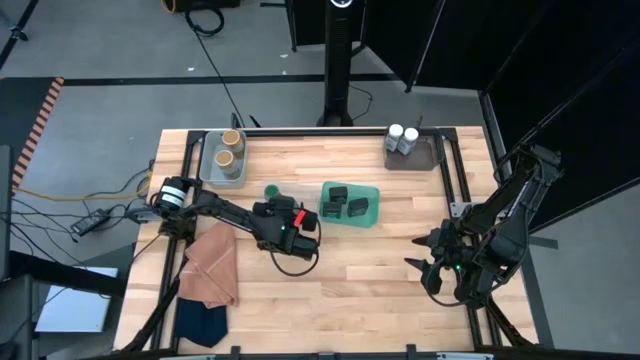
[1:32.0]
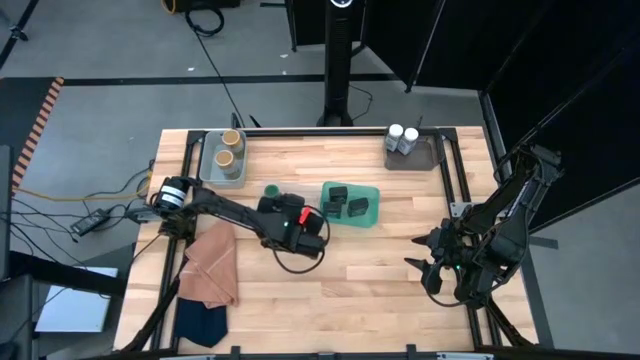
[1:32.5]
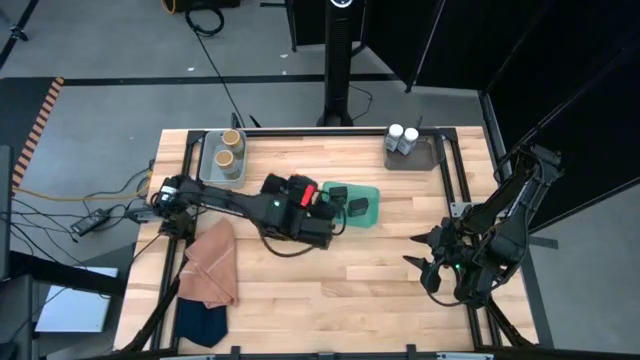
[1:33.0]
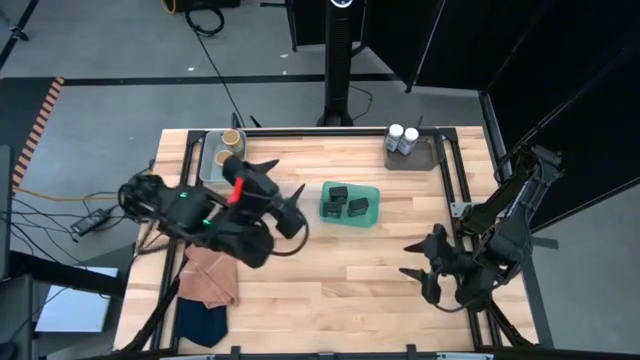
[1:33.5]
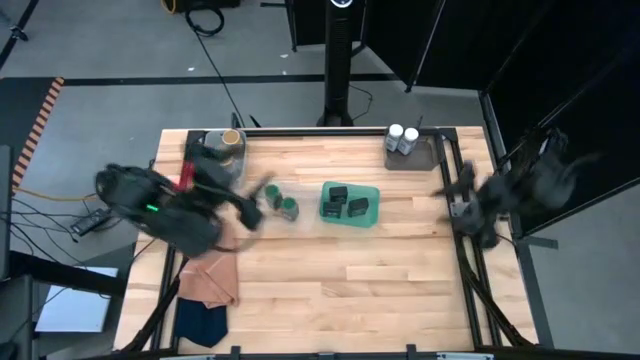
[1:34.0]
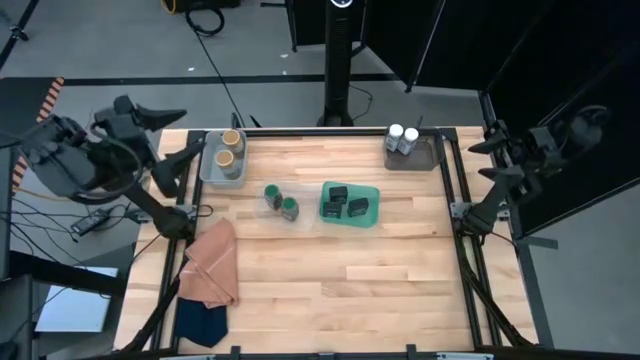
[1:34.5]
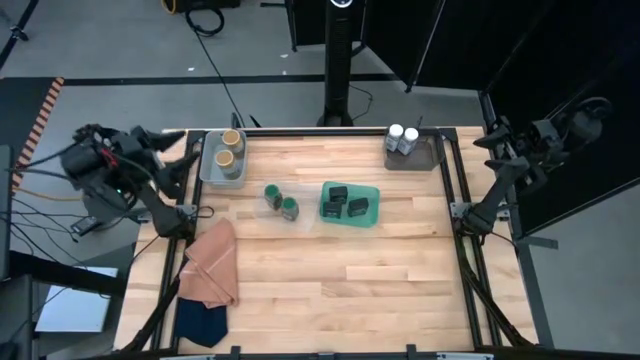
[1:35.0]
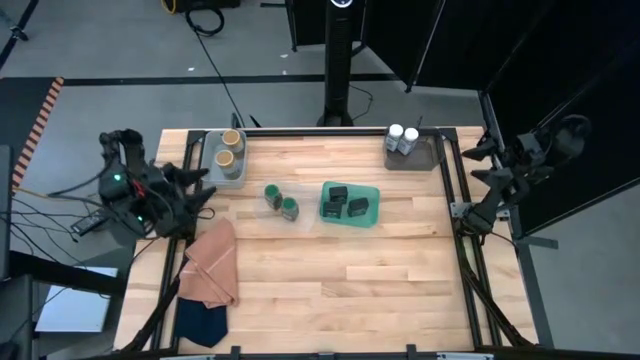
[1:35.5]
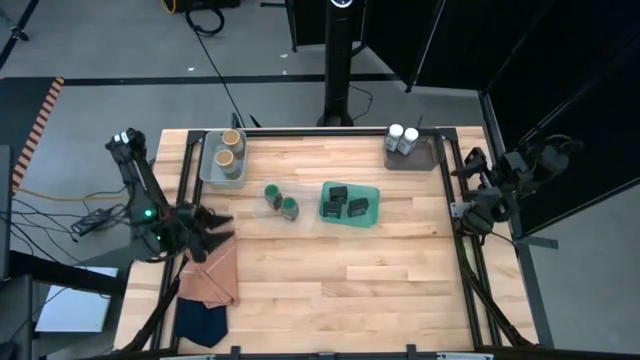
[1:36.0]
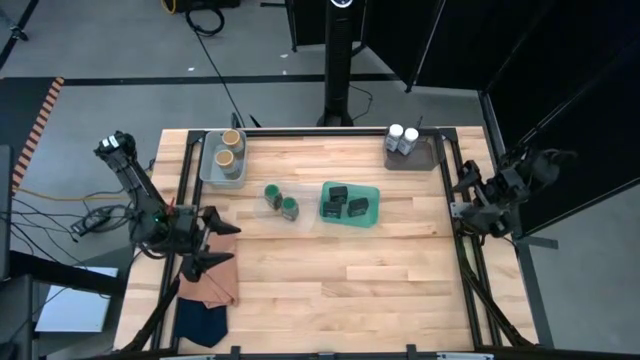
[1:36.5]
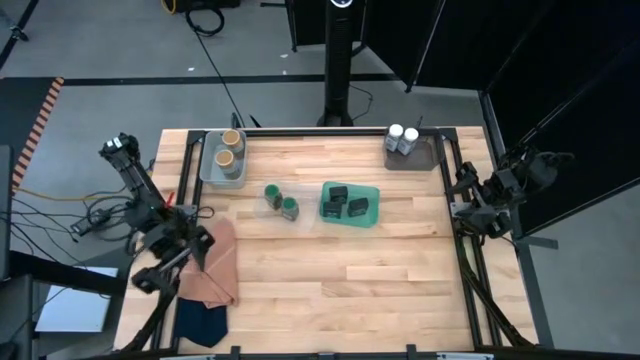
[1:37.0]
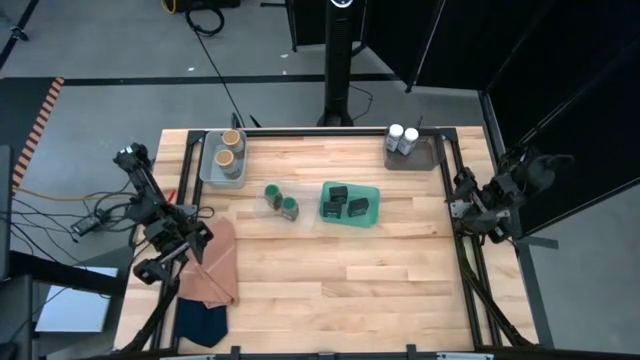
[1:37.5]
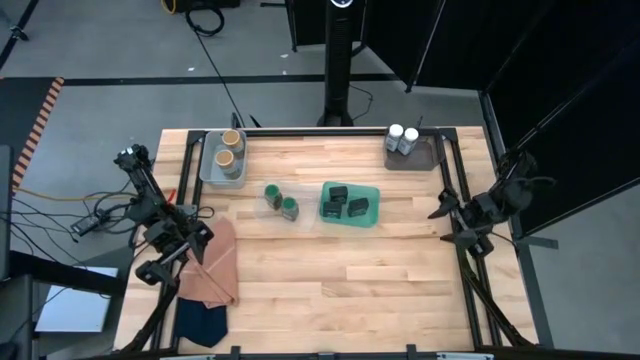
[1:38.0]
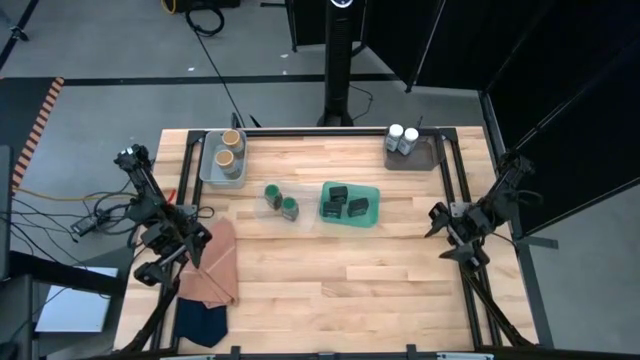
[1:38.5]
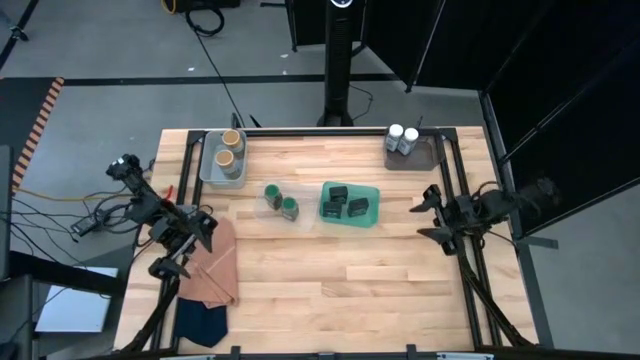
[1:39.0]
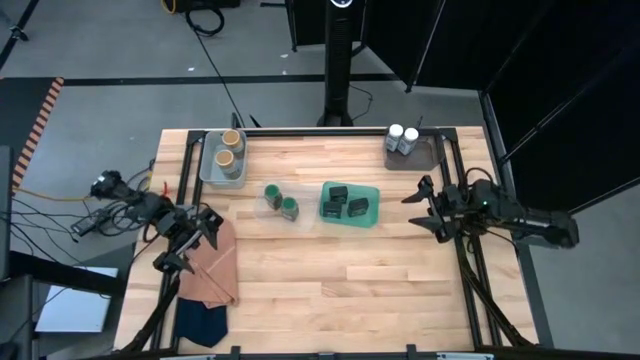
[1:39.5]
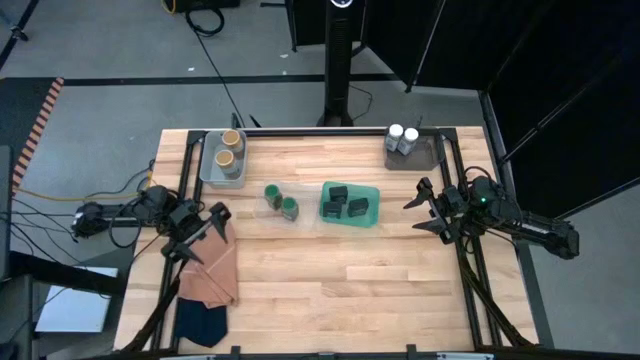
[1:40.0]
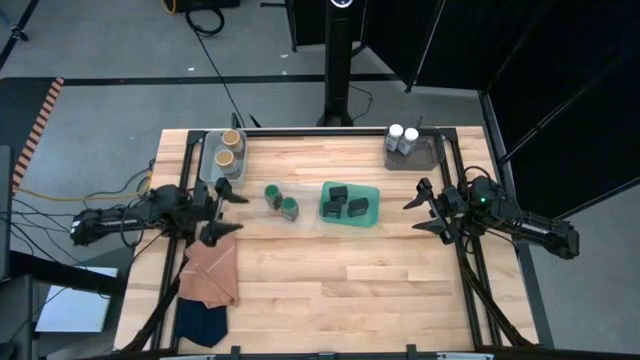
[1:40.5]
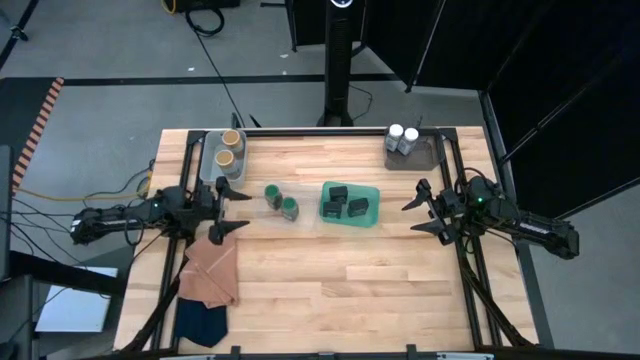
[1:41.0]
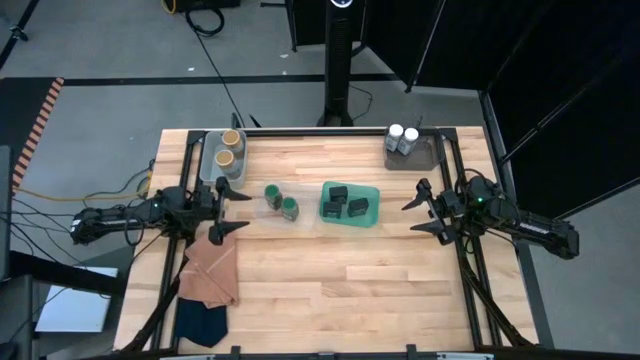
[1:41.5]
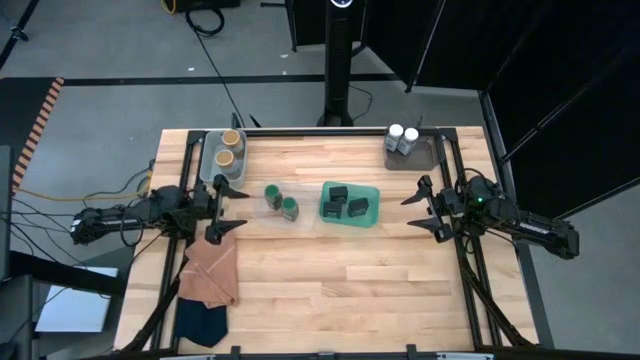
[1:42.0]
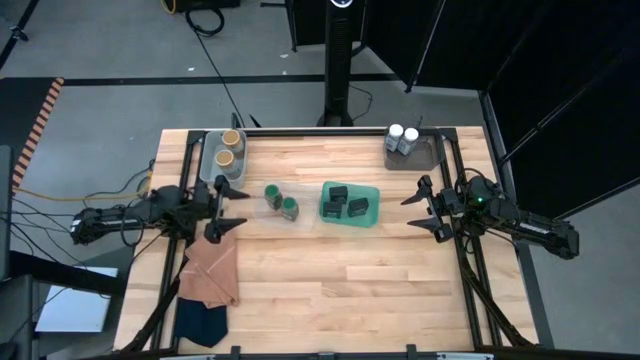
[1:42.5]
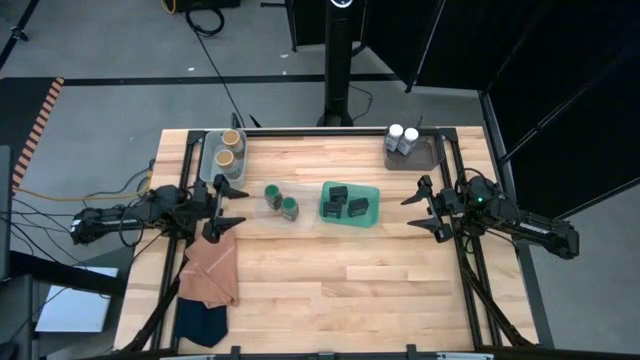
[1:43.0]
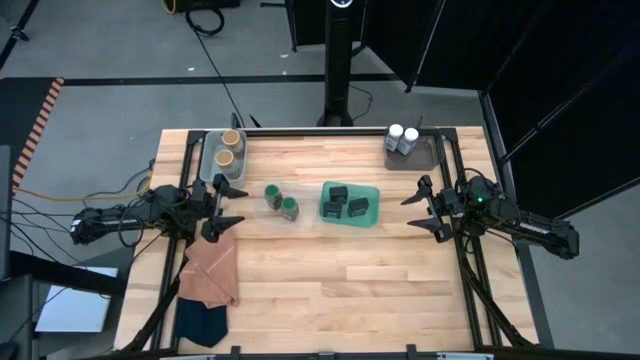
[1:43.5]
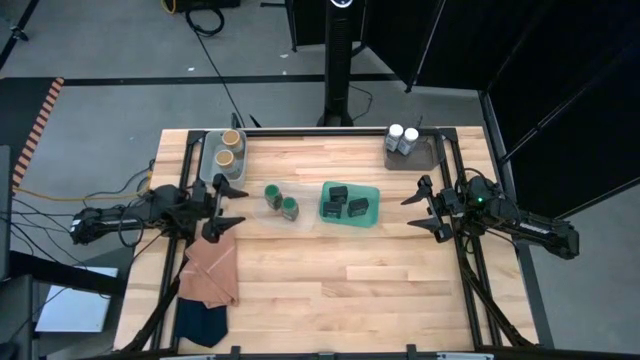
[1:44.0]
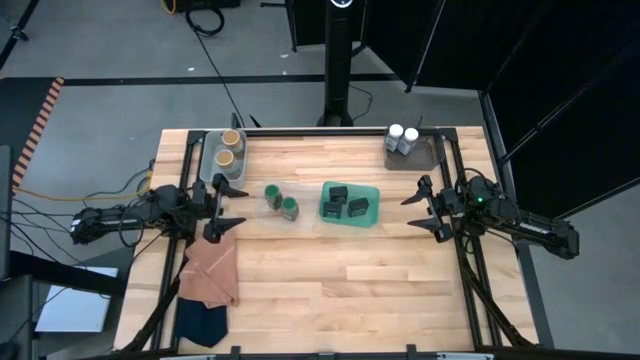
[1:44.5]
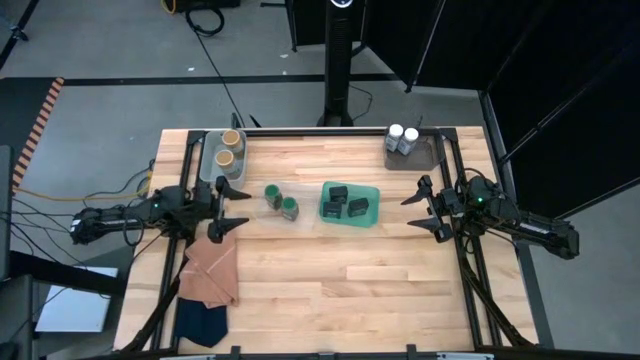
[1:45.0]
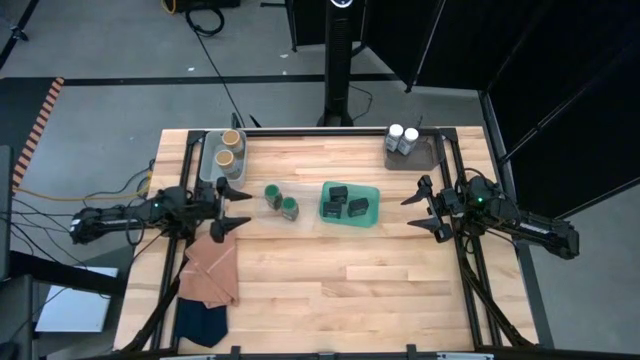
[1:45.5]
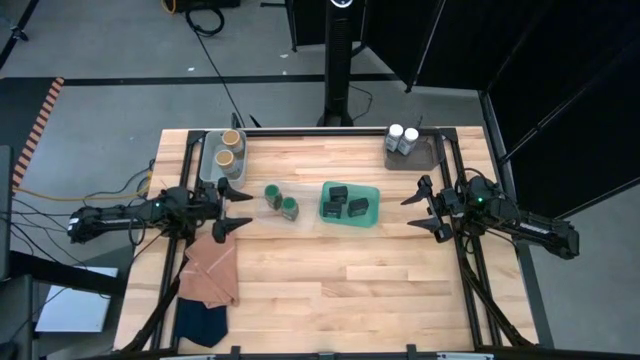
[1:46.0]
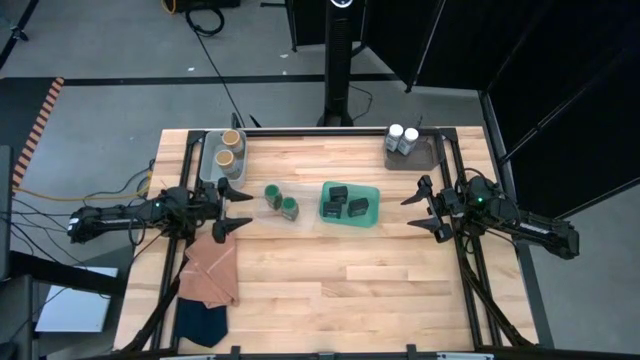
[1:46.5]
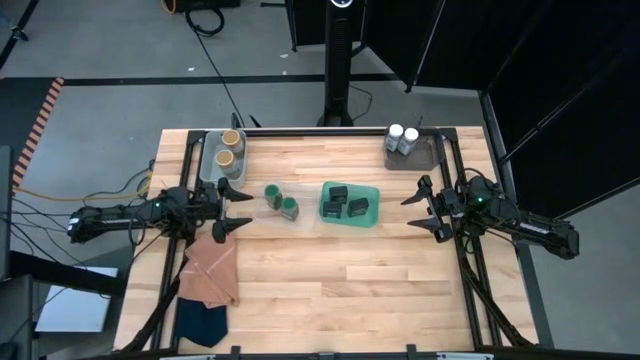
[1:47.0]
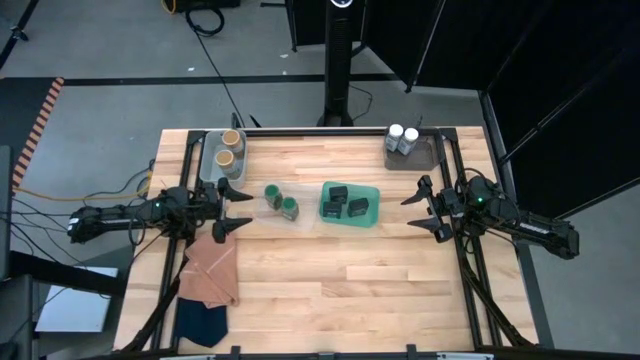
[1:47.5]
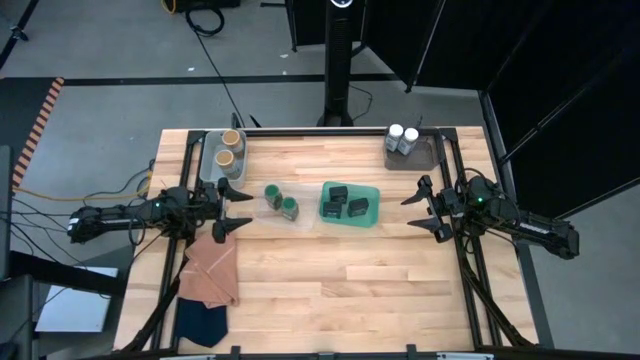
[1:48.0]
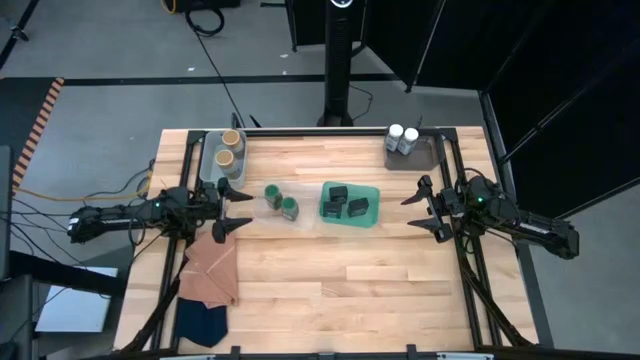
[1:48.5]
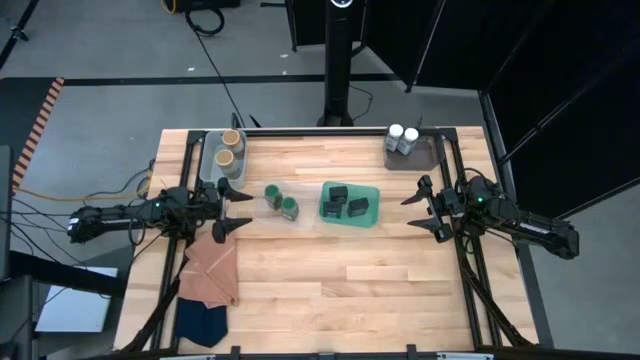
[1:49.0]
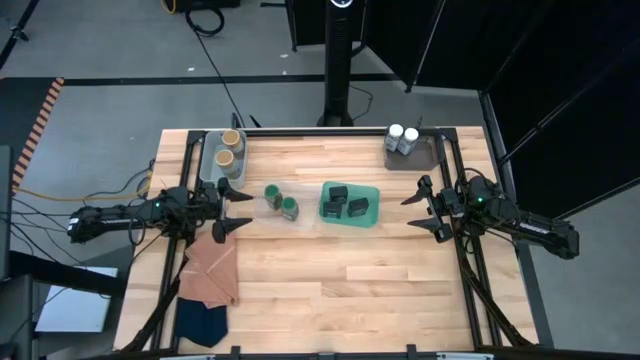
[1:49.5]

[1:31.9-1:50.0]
Task: Sort spices by type
Return to Home Position

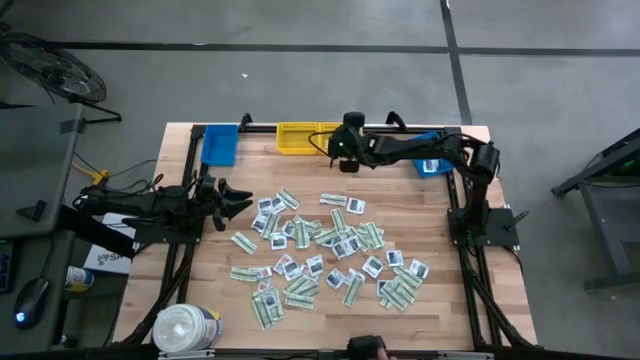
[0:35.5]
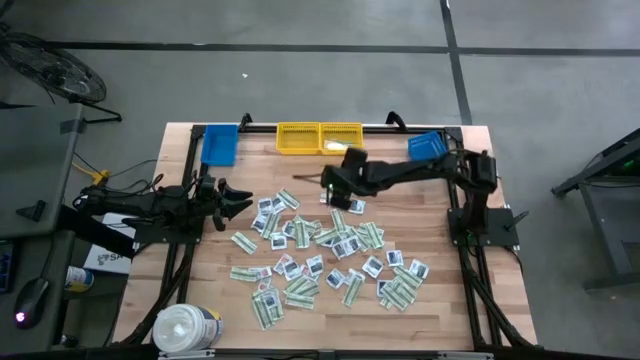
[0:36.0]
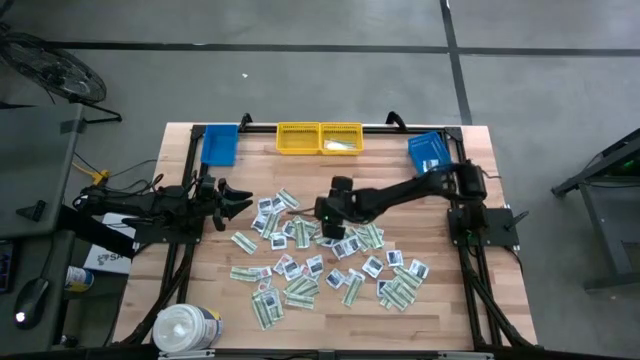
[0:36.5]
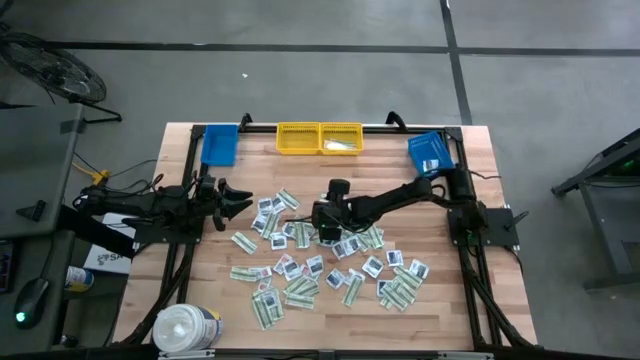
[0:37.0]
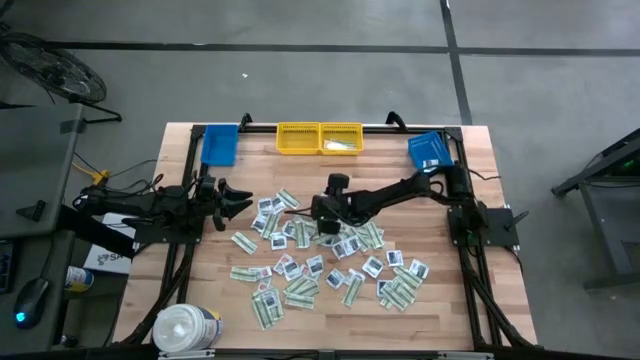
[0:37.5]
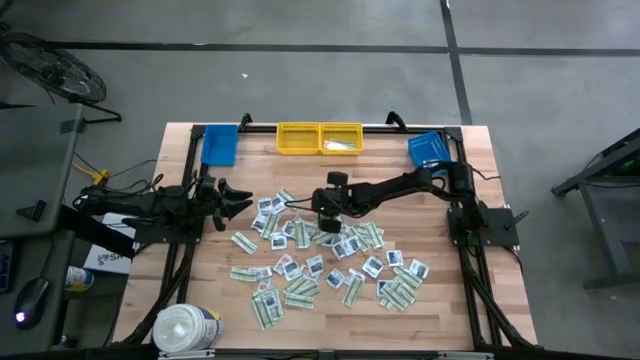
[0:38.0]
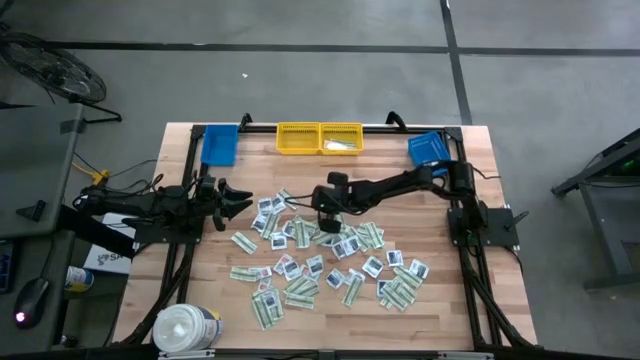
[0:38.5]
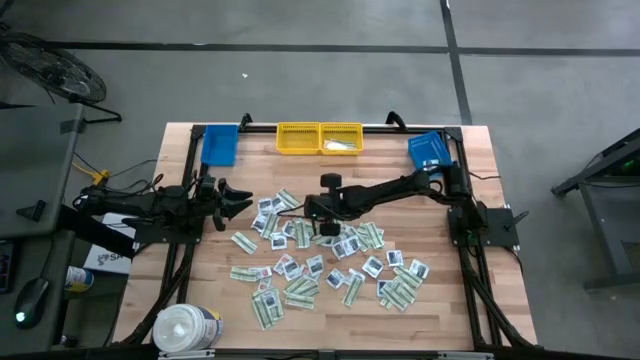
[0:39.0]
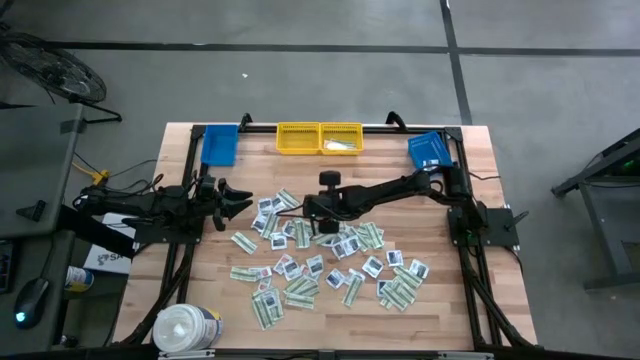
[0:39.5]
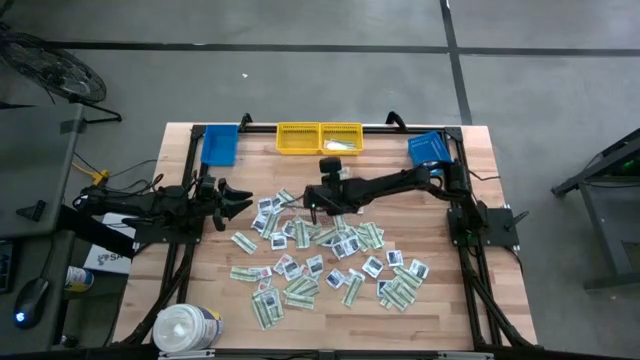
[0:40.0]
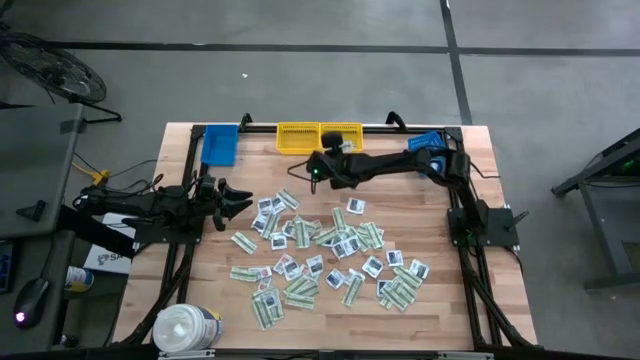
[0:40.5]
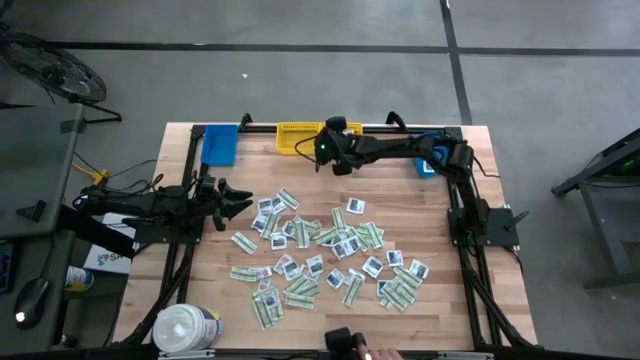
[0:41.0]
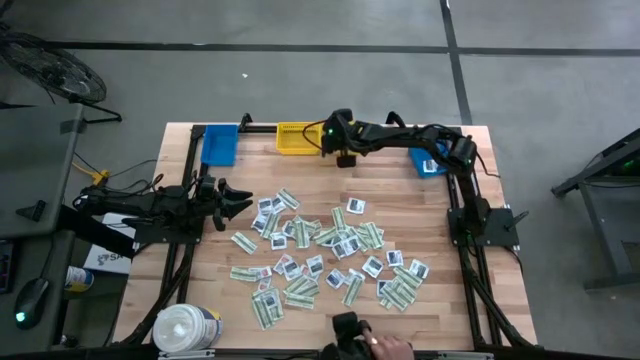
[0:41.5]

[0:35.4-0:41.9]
Task: Pick & Place First Aid Supplies
Put the green bandage pack into the right yellow bin
